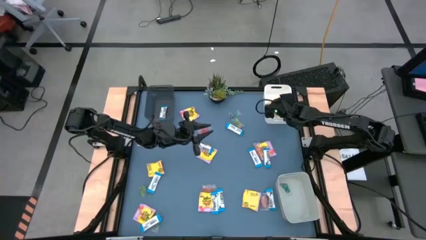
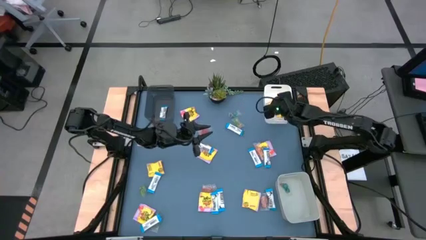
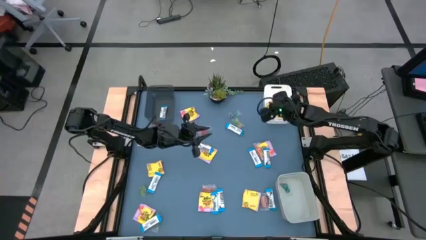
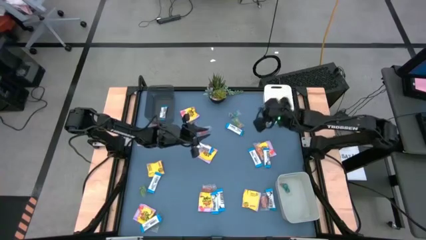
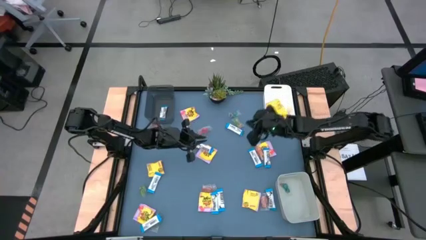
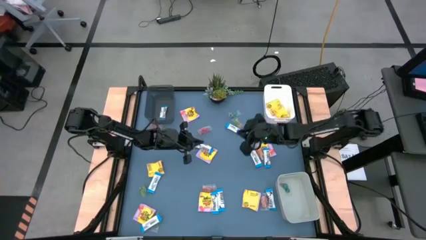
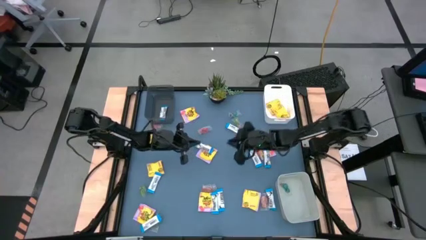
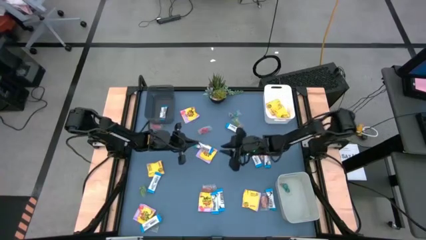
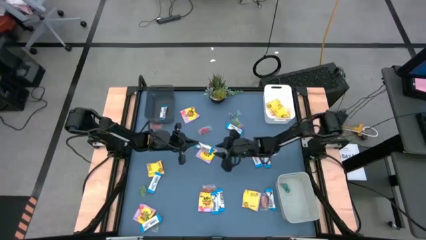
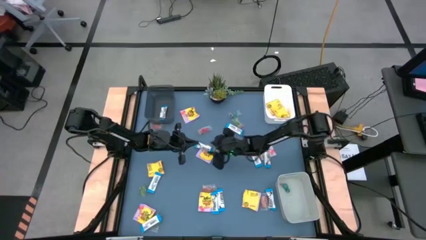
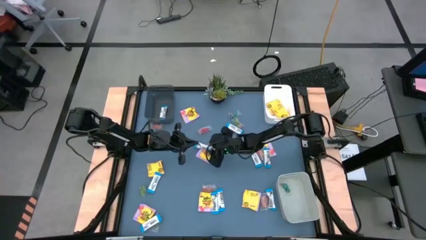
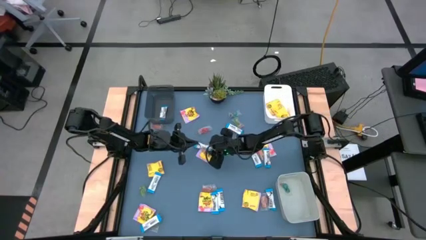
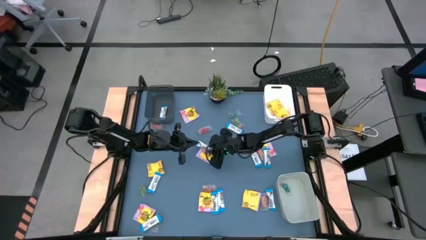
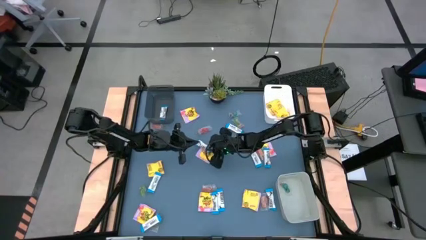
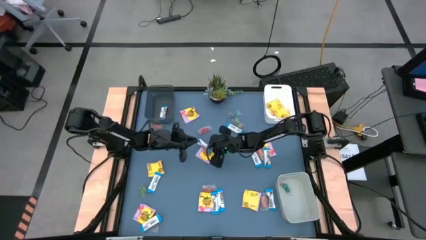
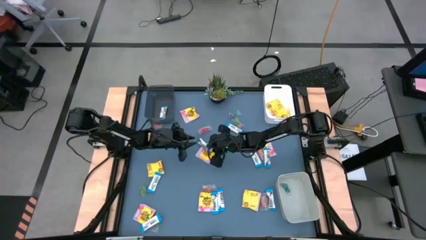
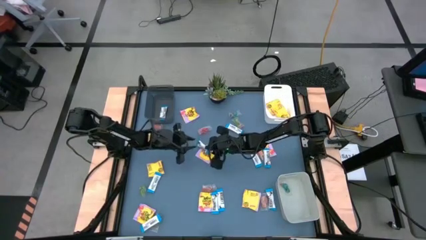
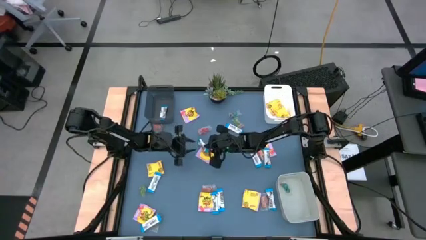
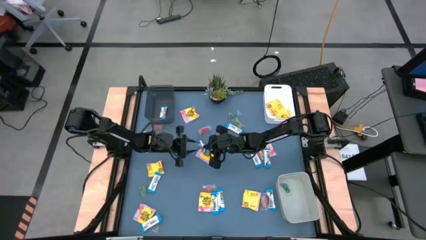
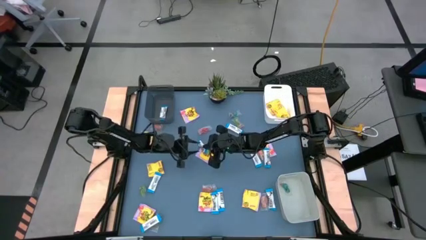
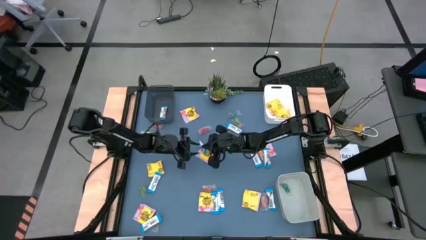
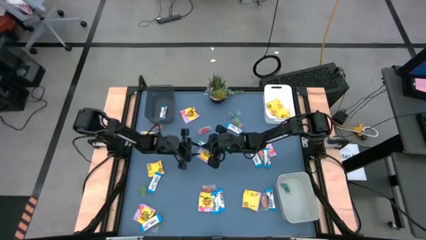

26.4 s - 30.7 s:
Task: Sort candy
Put the middle white chocolate bar into the transparent black bin

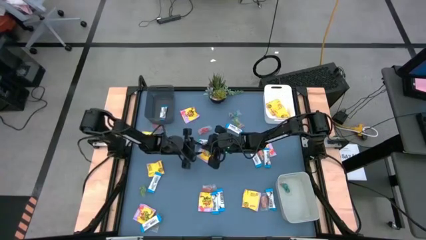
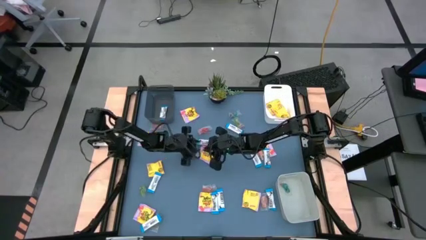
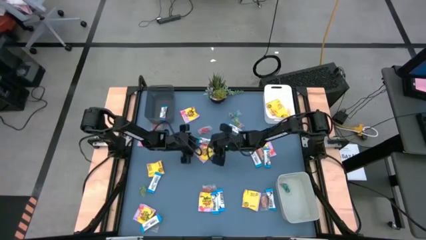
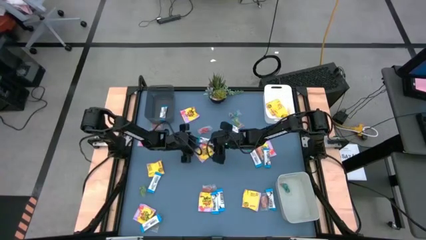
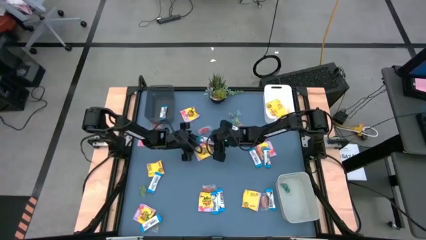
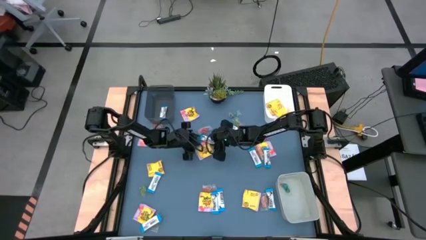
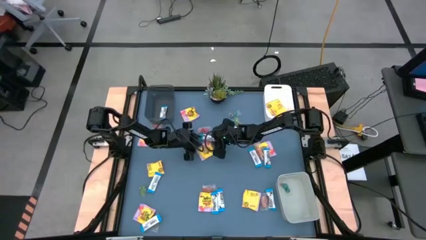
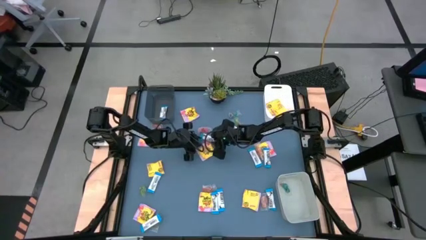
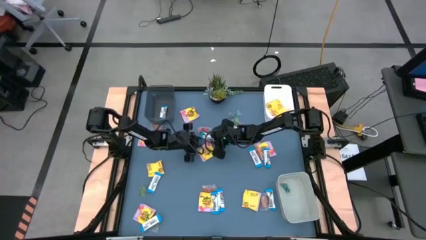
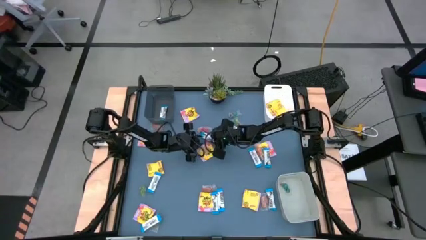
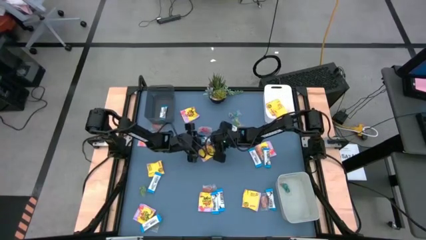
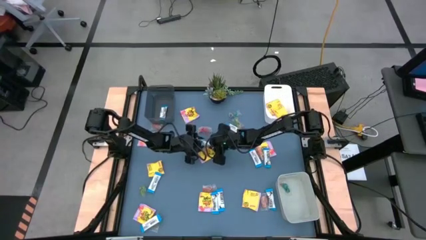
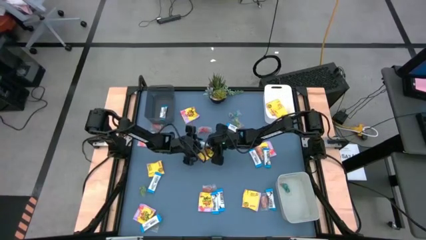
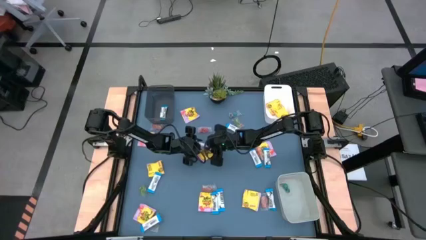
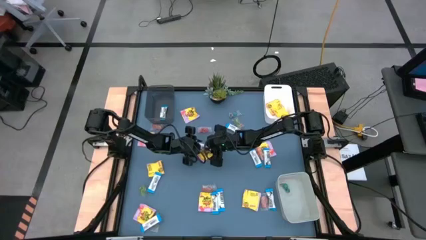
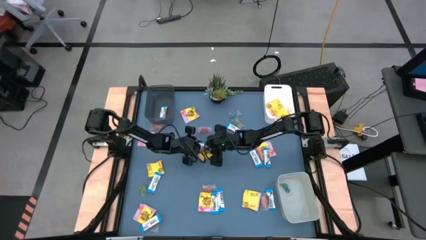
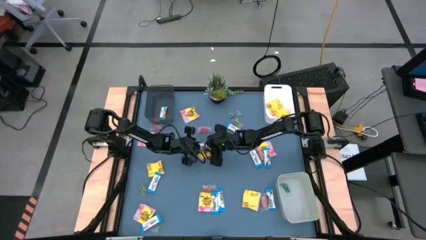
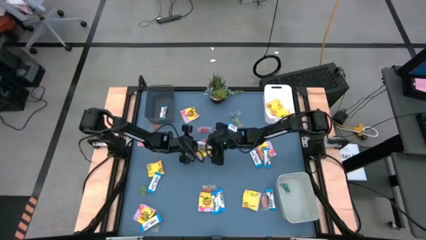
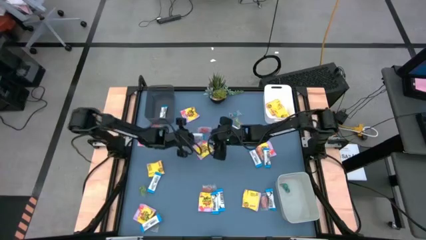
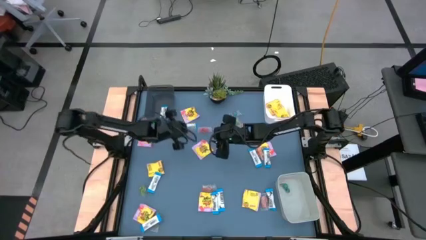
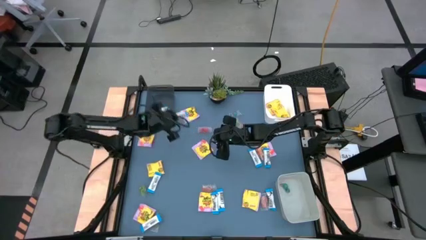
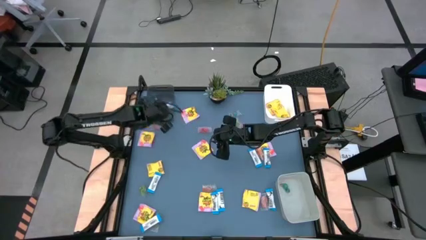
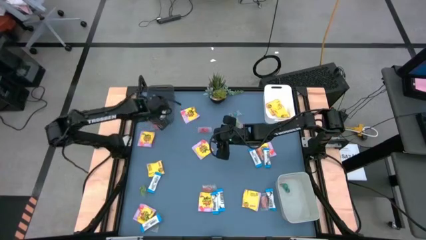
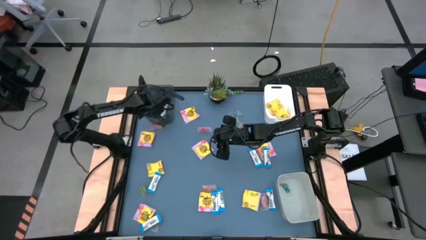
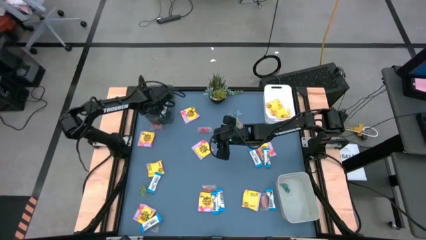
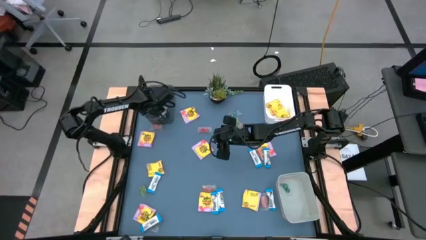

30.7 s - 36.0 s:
Put the middle white chocolate bar into the transparent black bin

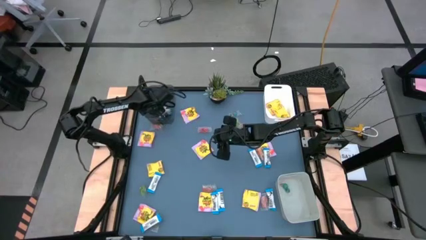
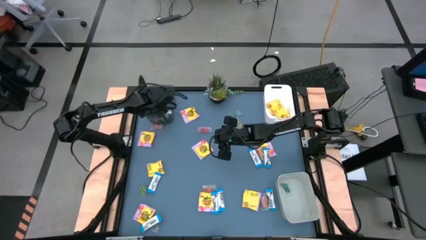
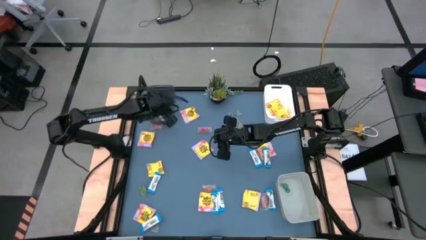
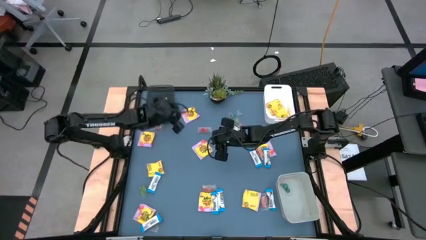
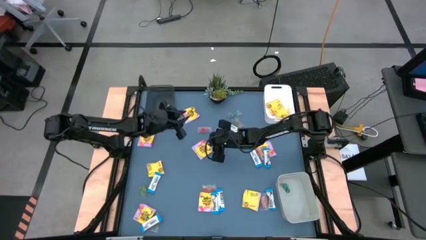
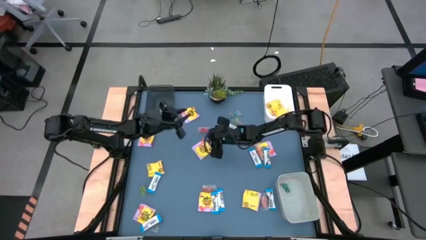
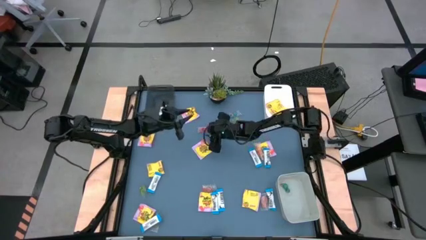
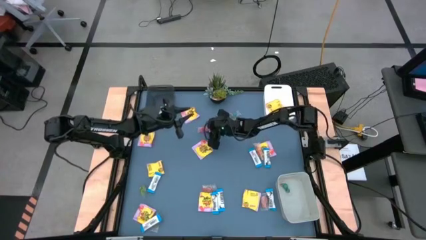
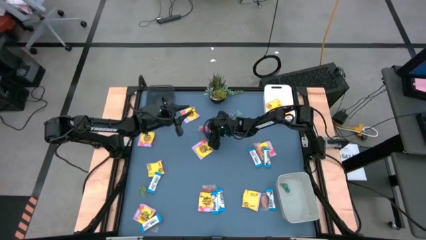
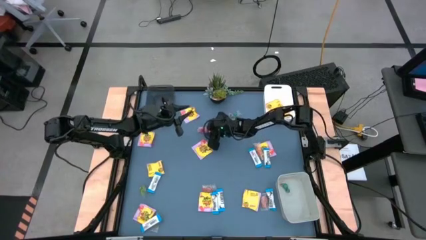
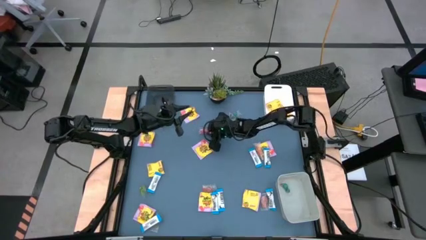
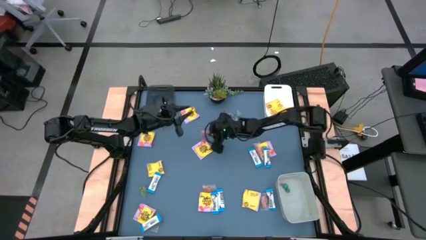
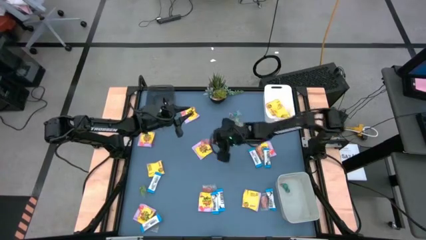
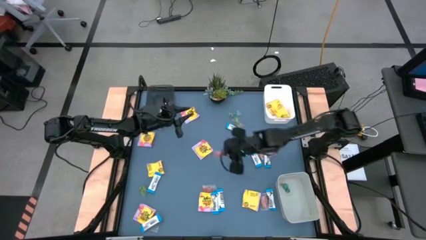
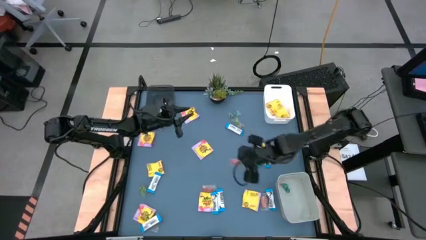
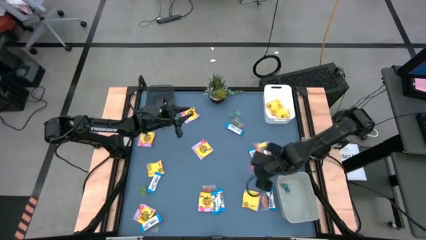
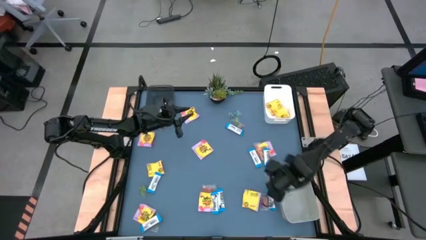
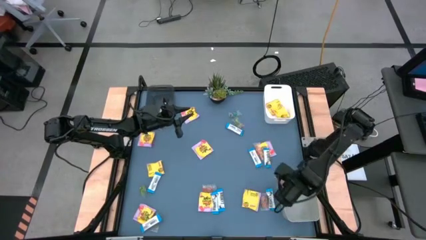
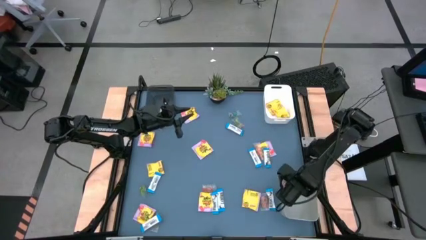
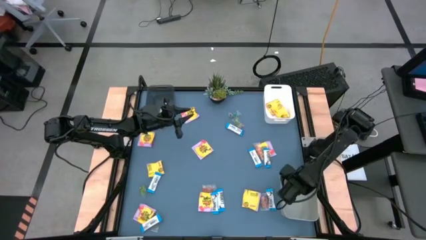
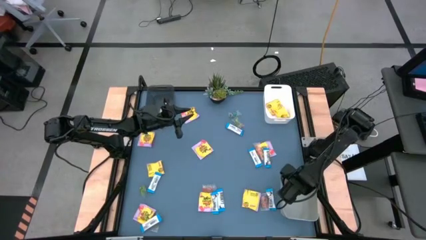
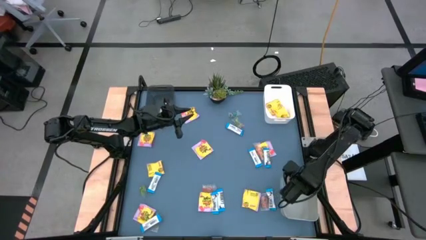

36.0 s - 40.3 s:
Put the top red gummy candy into the grey bin

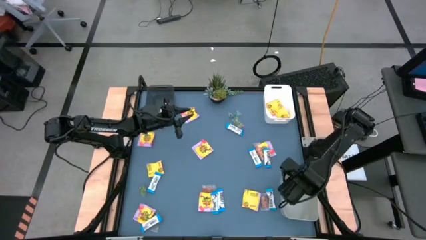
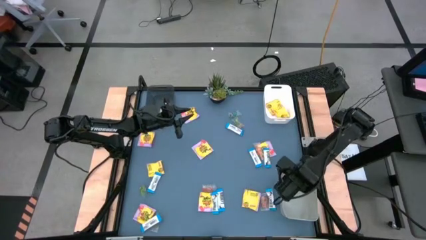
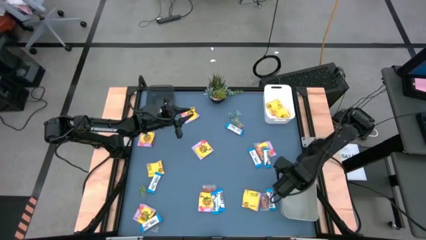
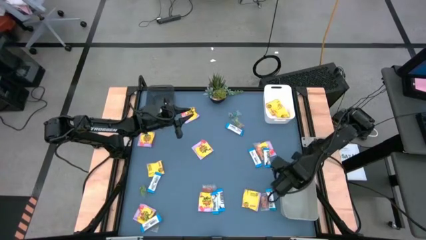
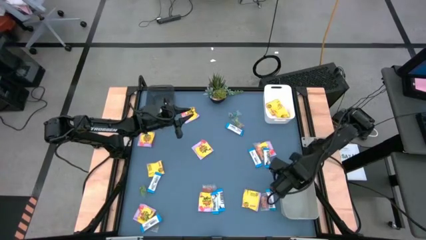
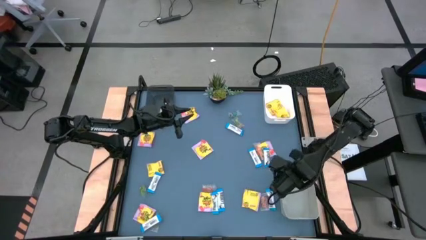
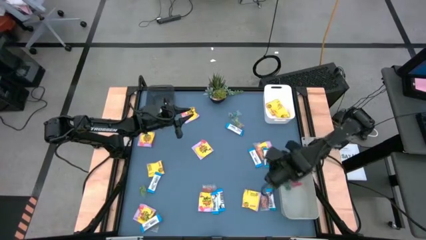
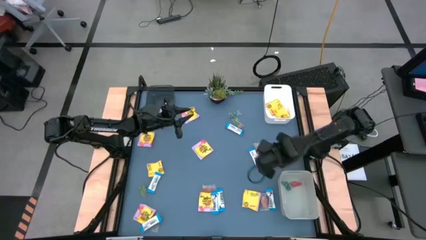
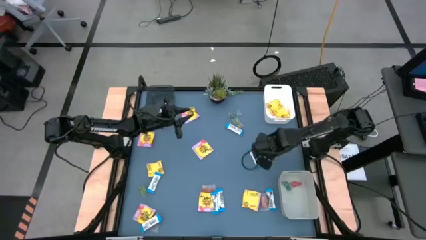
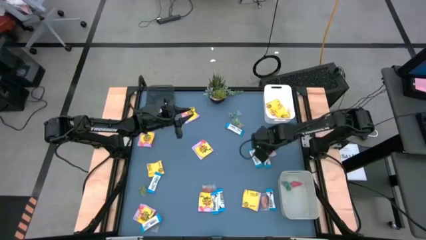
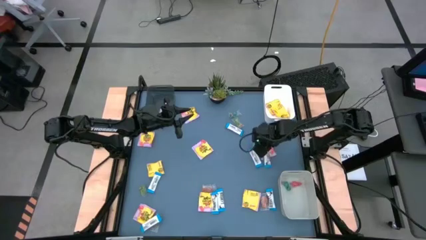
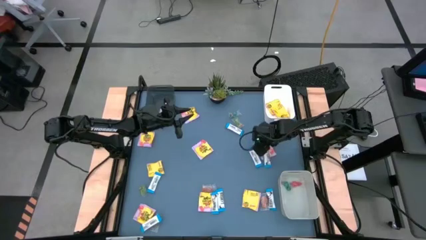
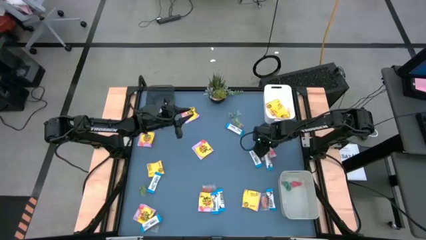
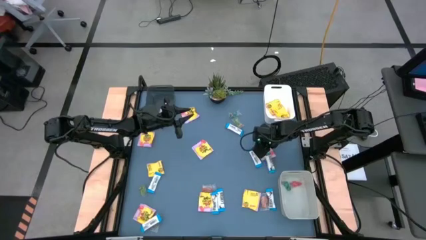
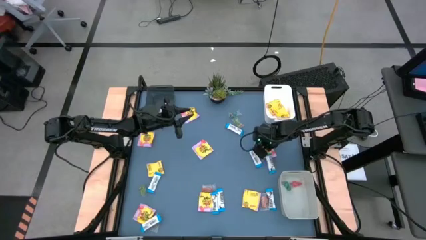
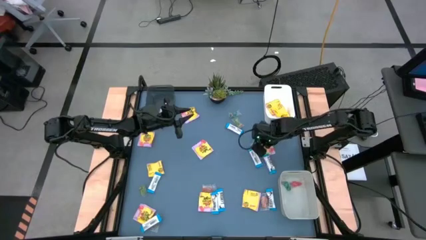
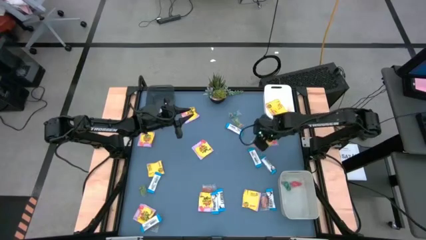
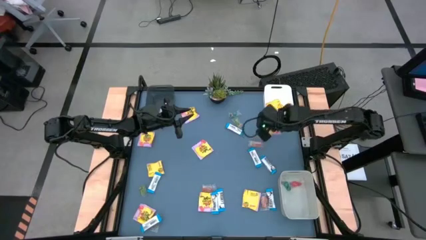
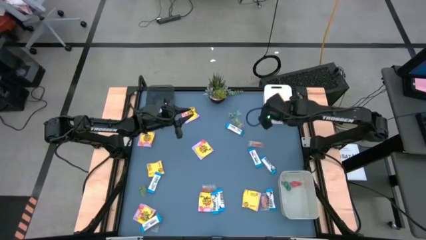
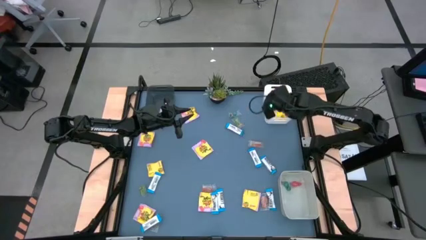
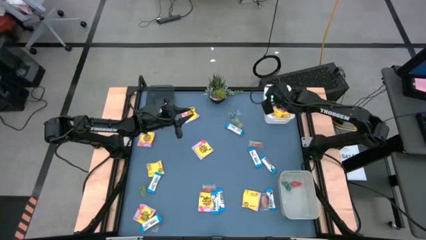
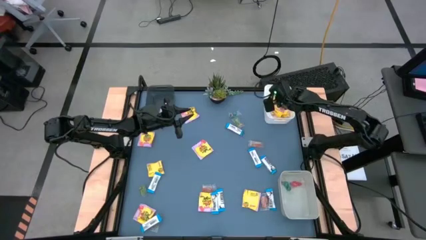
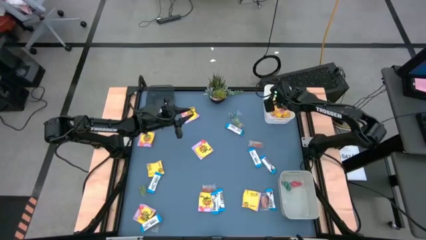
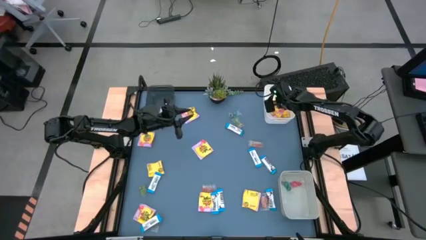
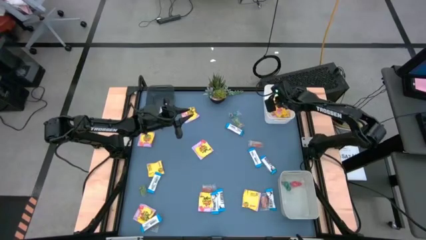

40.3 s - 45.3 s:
Put the middle right yellow candy pack into the white bin
